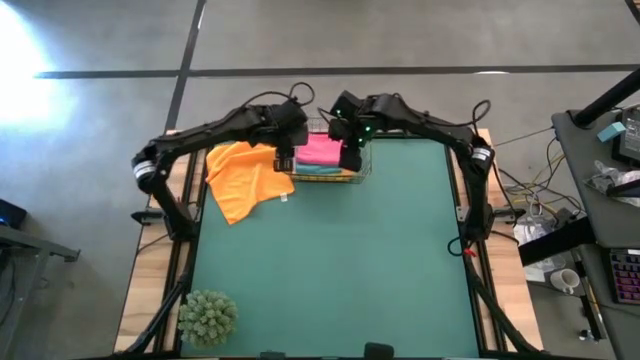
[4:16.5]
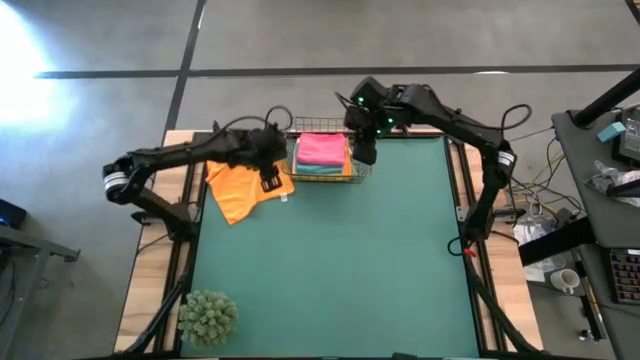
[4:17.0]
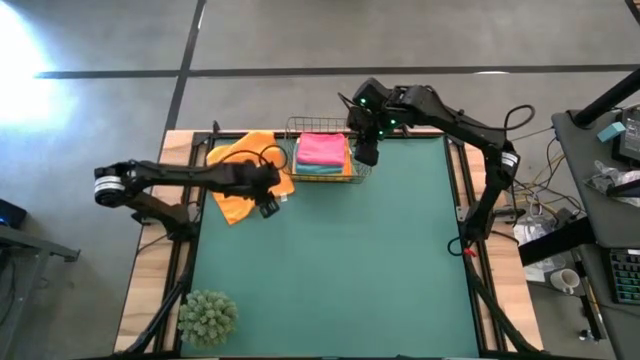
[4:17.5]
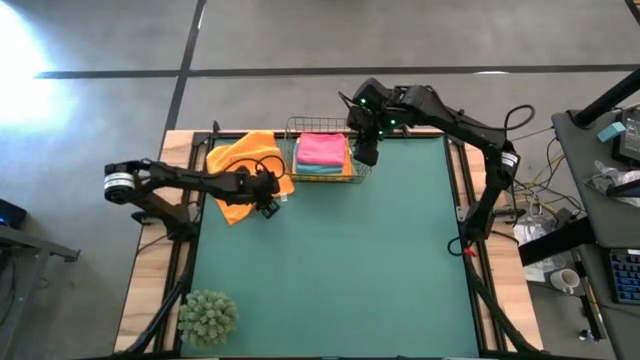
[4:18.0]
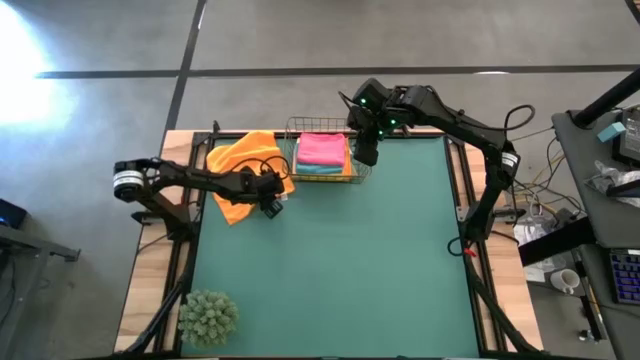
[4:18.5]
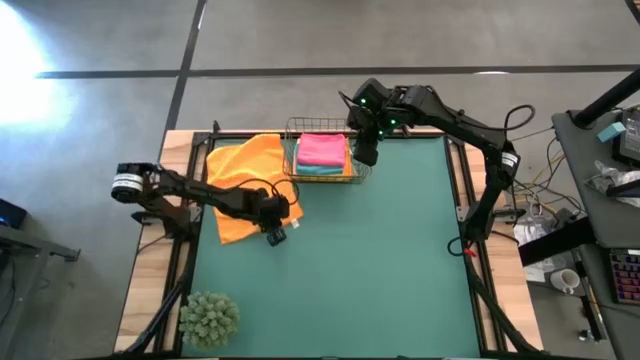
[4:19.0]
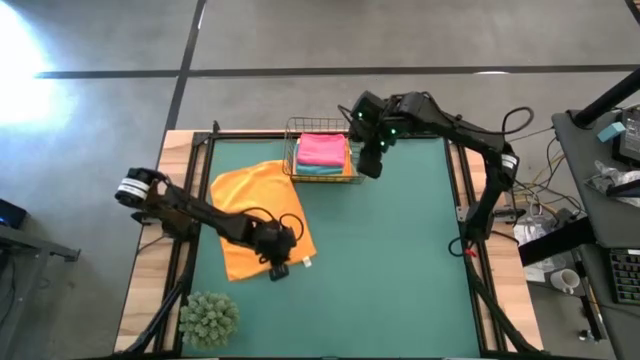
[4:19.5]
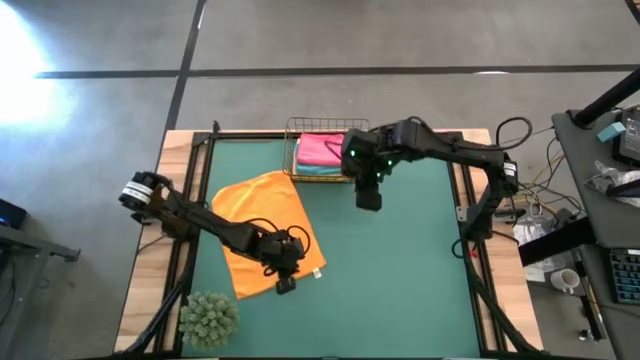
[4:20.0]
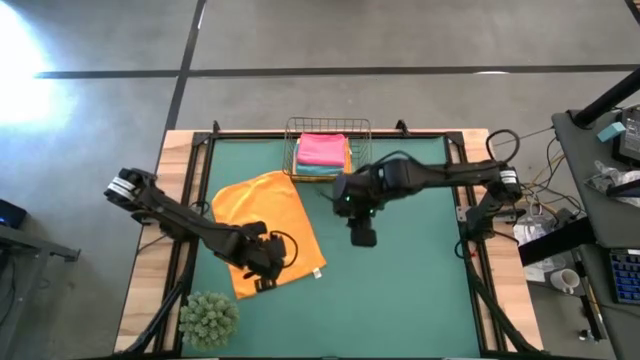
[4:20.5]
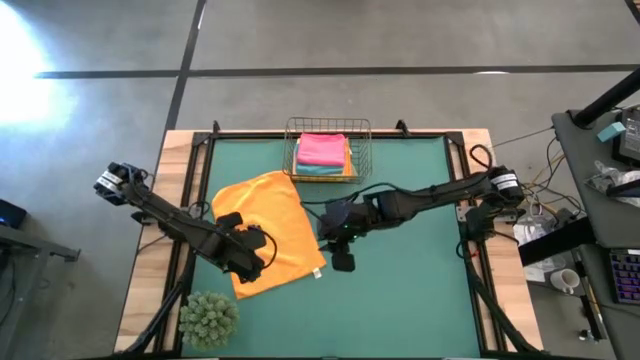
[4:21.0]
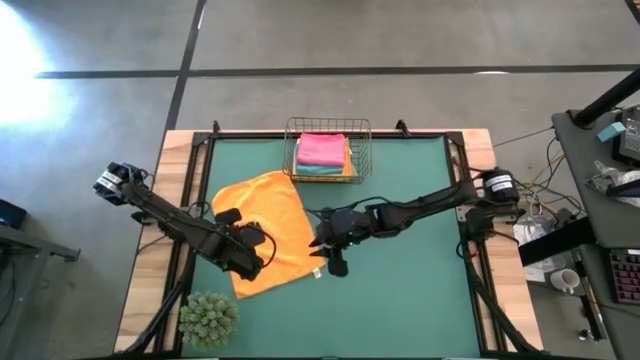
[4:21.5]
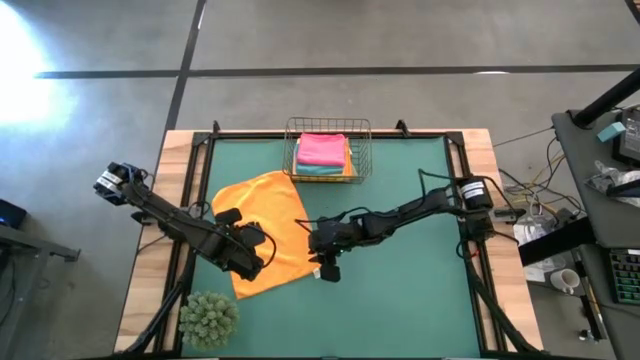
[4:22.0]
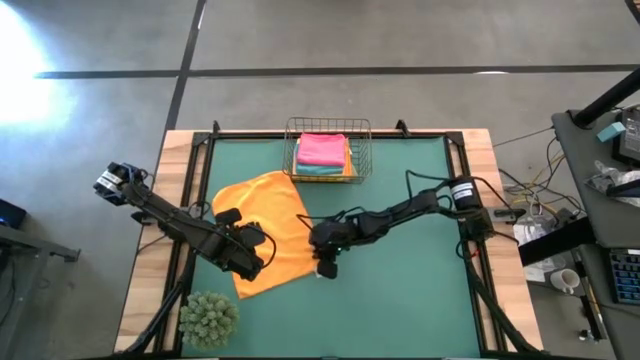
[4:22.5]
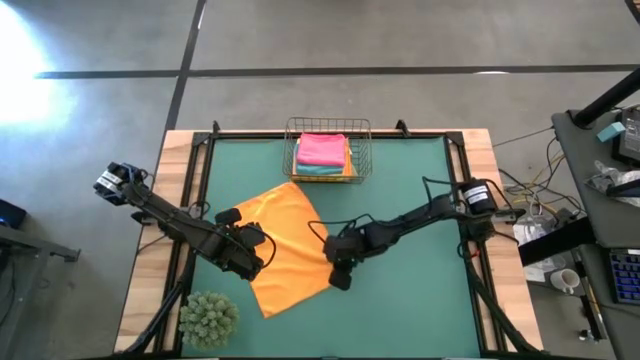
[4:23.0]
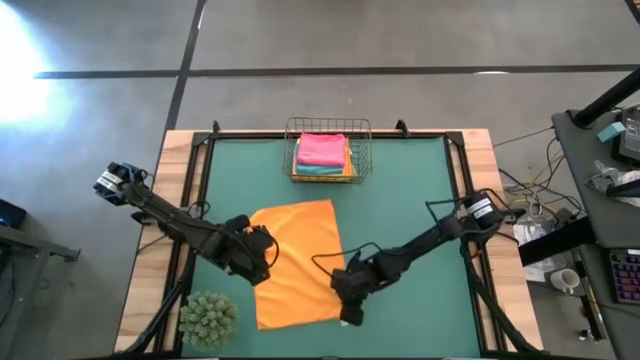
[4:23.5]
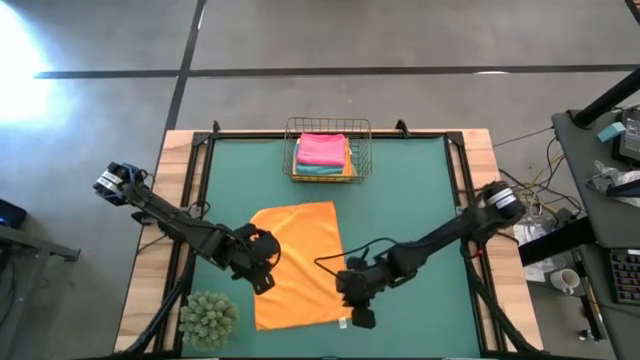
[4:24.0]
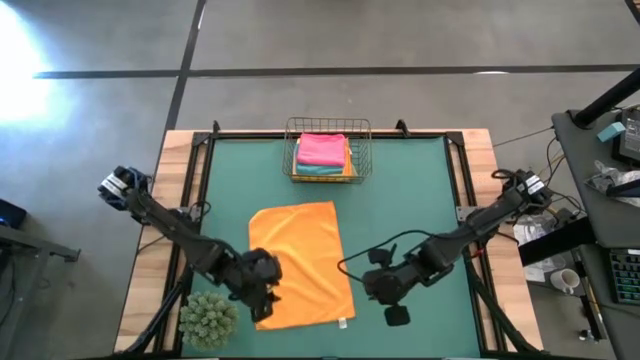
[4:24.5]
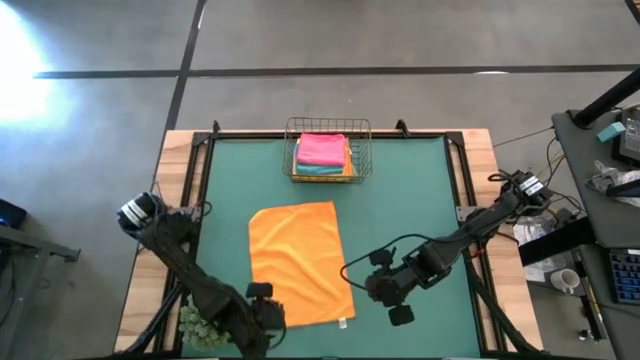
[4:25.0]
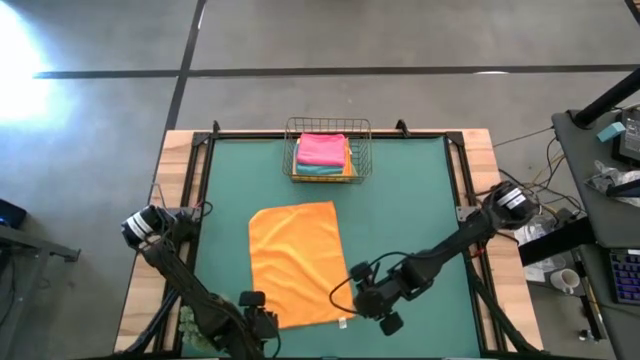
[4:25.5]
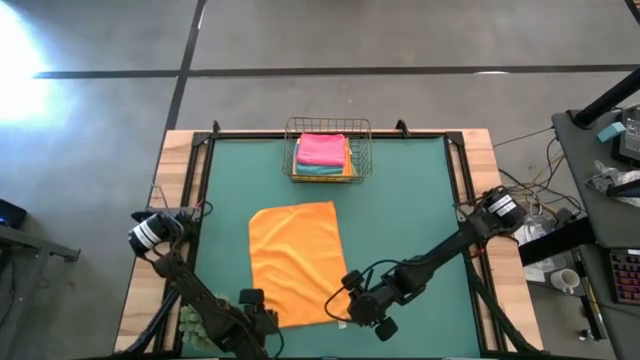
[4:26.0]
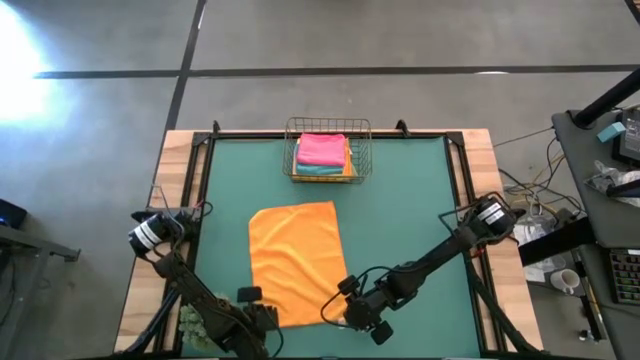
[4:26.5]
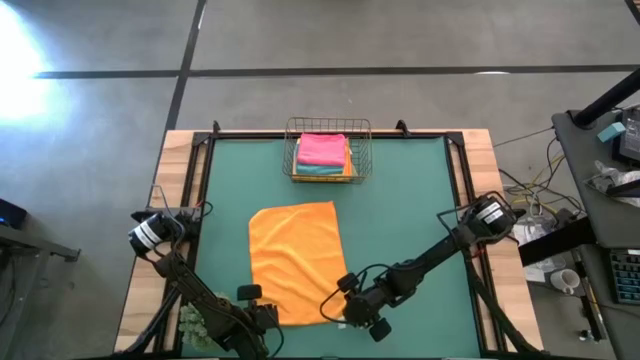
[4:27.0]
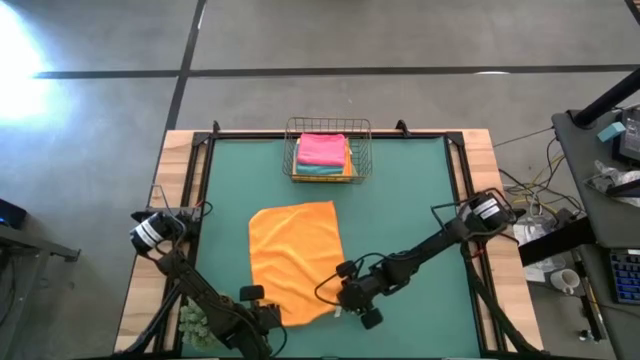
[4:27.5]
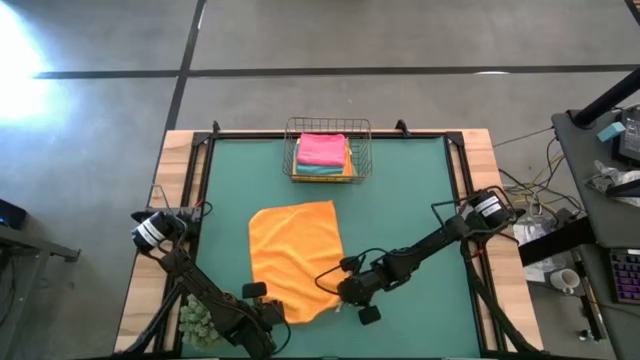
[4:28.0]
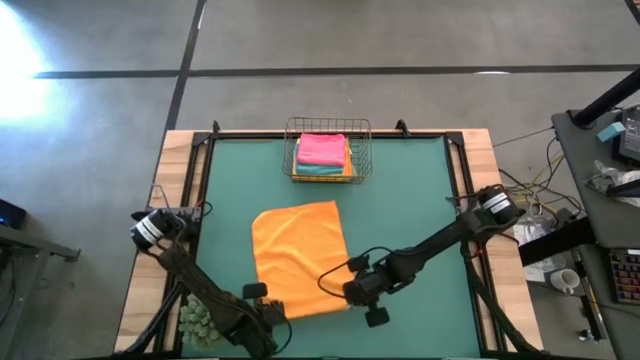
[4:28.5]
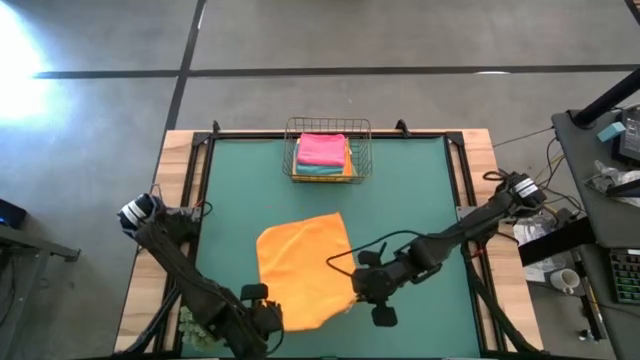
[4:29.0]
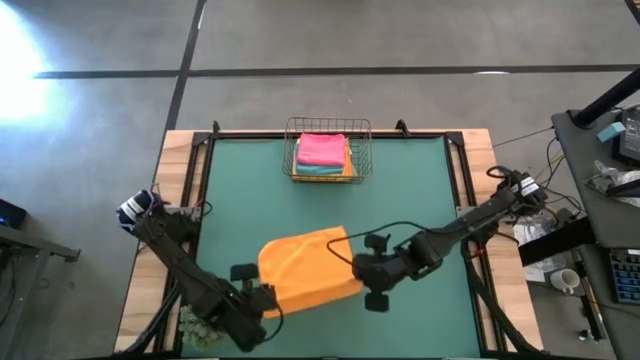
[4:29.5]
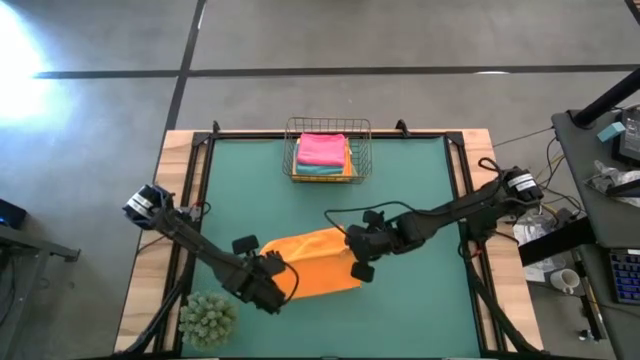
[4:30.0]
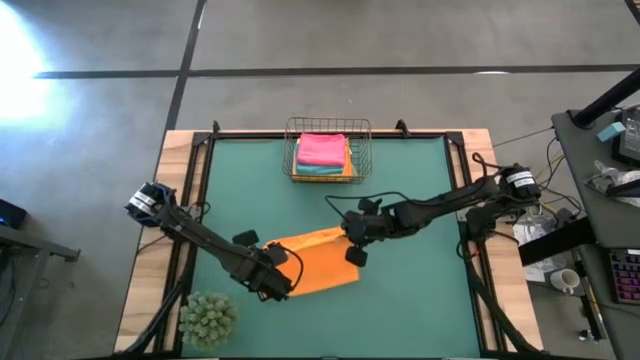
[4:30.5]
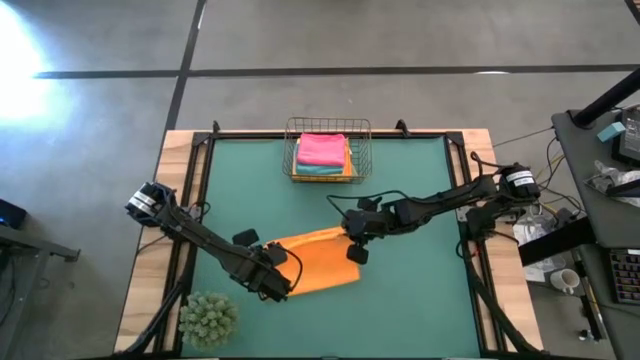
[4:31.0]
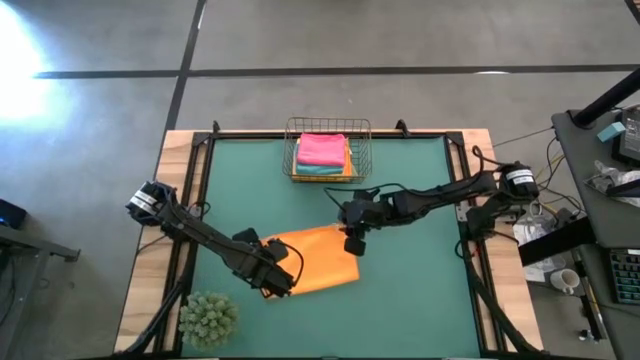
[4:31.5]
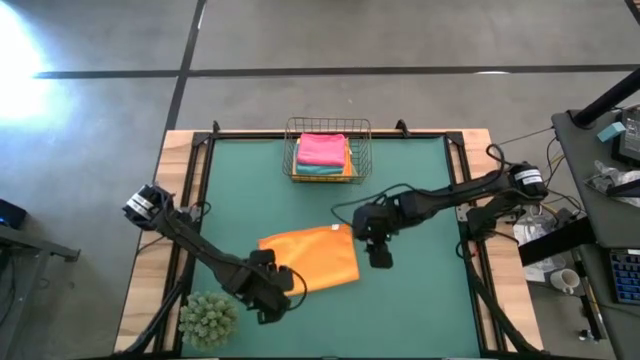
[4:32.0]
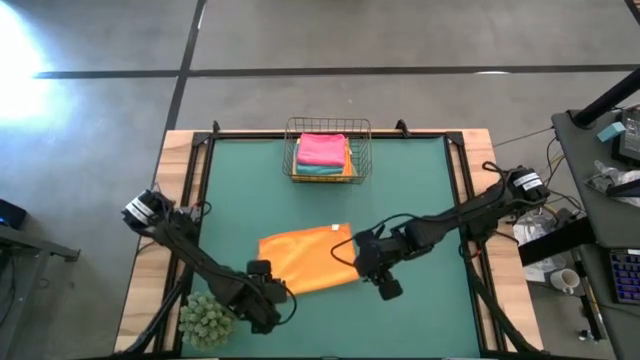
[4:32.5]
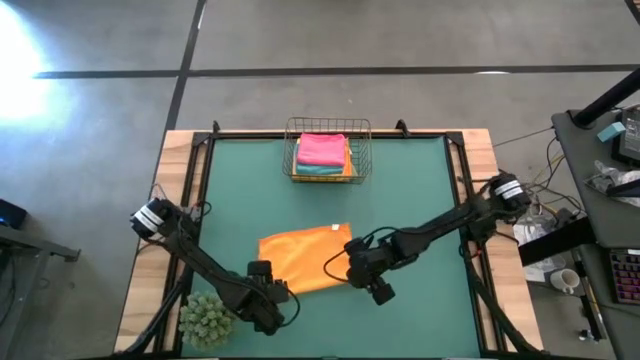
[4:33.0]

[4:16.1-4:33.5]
Task: Fold microfiber towels
Fold the yellow microfiber cloth
